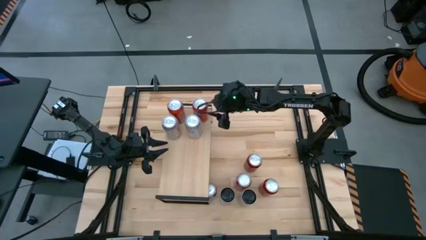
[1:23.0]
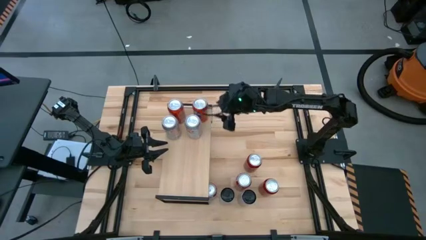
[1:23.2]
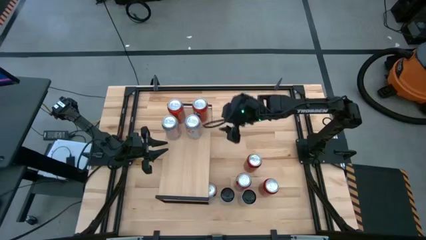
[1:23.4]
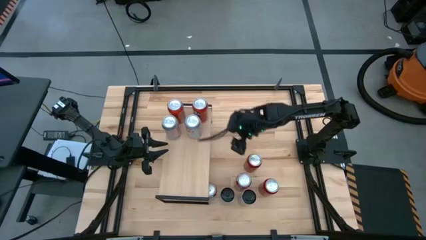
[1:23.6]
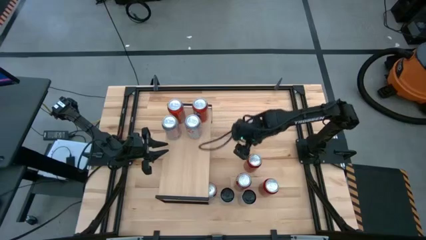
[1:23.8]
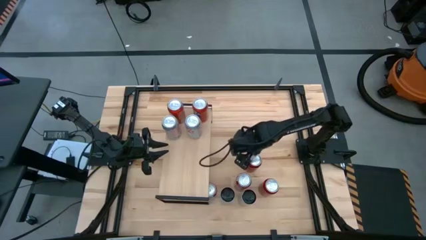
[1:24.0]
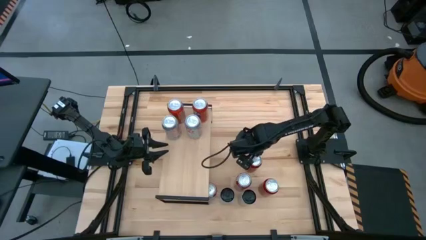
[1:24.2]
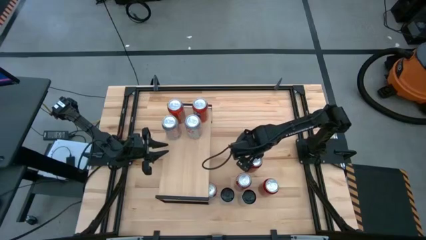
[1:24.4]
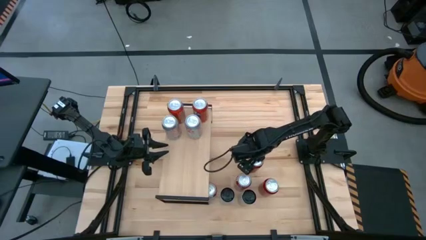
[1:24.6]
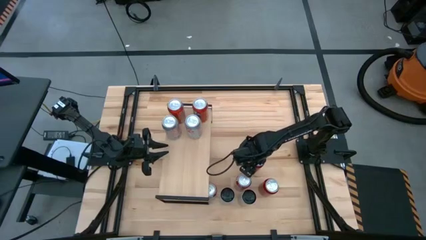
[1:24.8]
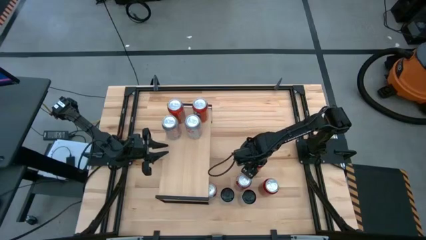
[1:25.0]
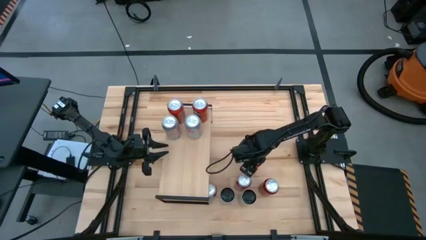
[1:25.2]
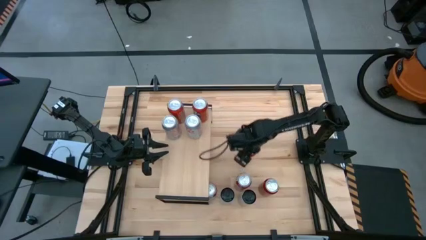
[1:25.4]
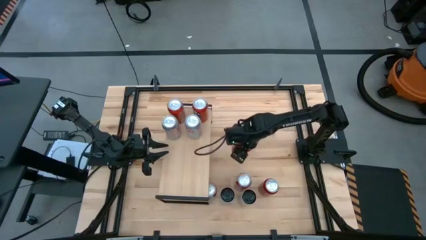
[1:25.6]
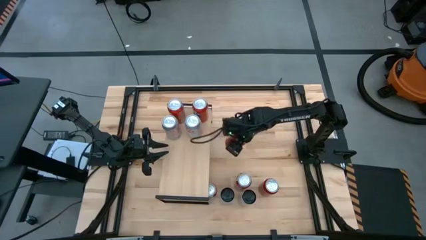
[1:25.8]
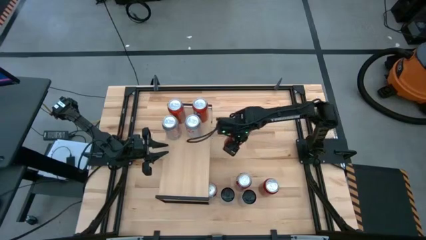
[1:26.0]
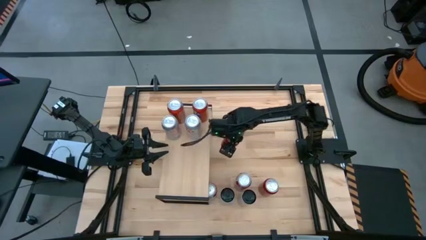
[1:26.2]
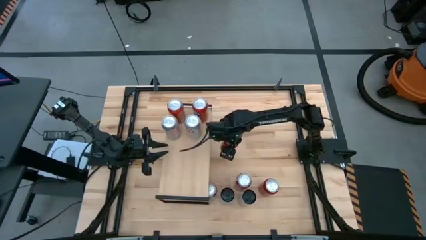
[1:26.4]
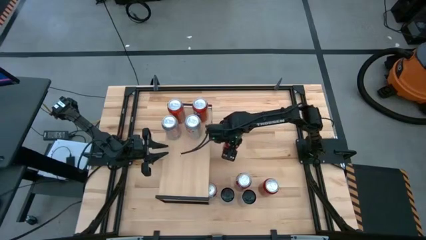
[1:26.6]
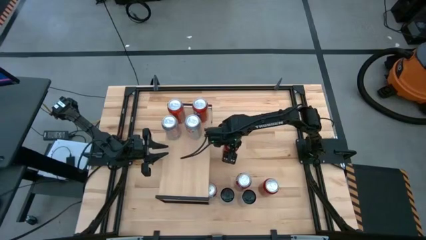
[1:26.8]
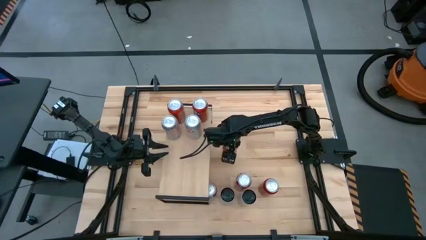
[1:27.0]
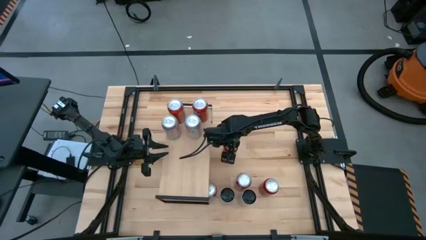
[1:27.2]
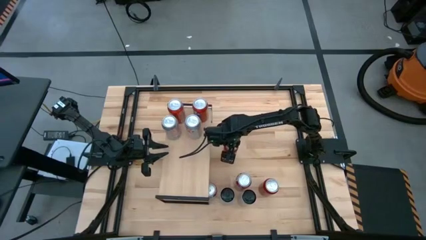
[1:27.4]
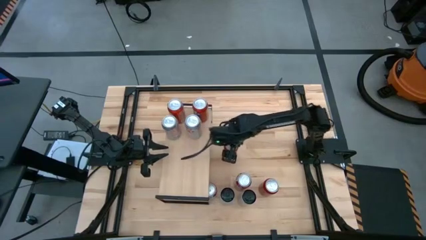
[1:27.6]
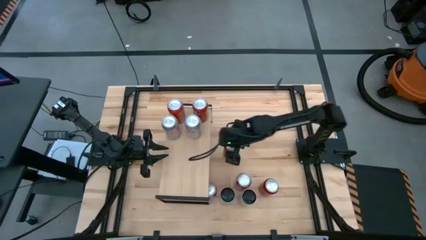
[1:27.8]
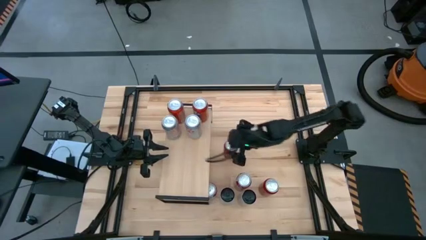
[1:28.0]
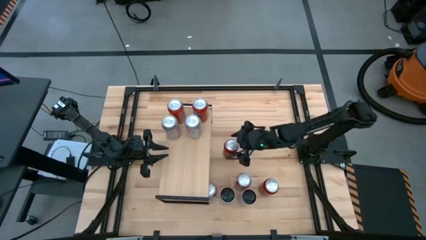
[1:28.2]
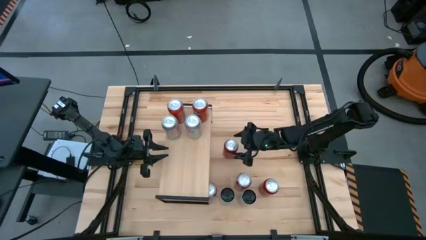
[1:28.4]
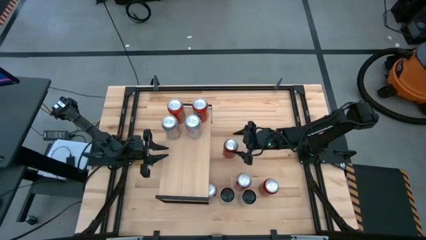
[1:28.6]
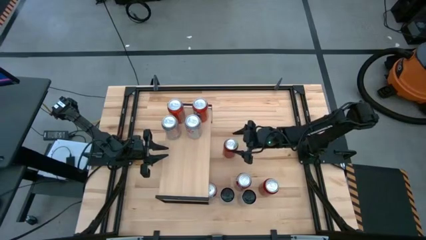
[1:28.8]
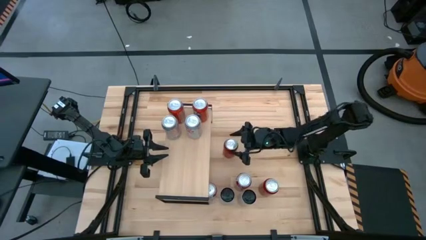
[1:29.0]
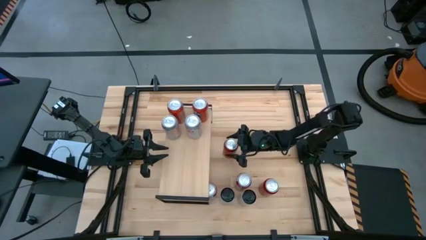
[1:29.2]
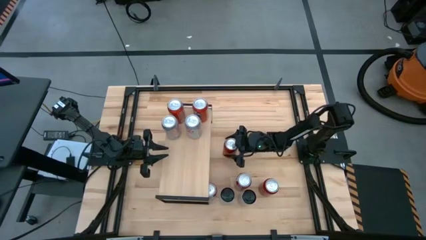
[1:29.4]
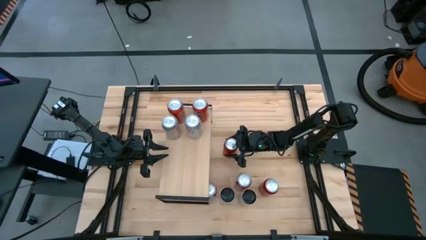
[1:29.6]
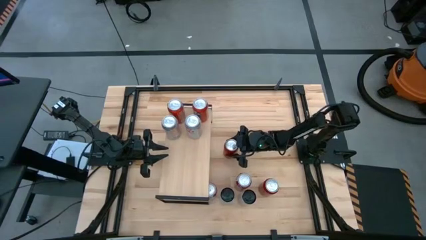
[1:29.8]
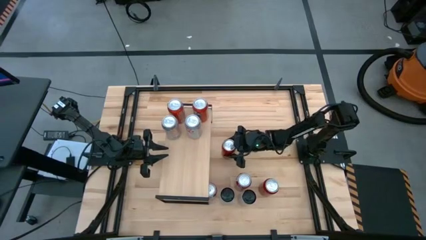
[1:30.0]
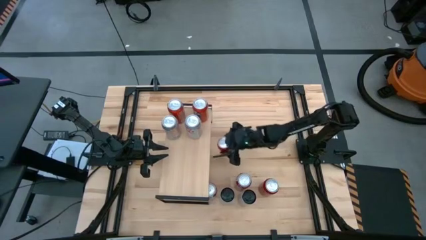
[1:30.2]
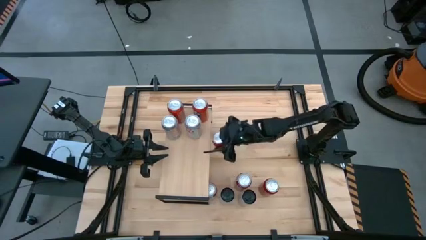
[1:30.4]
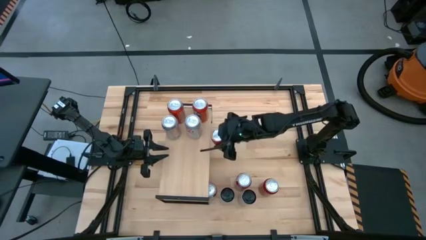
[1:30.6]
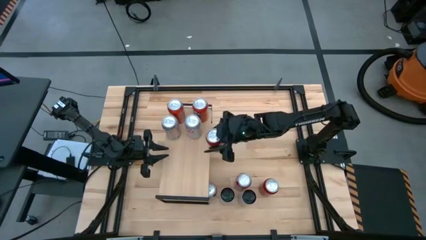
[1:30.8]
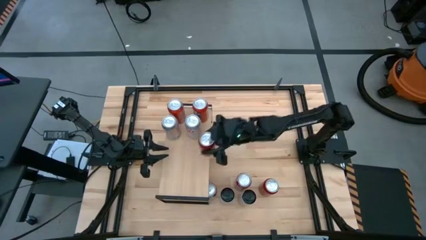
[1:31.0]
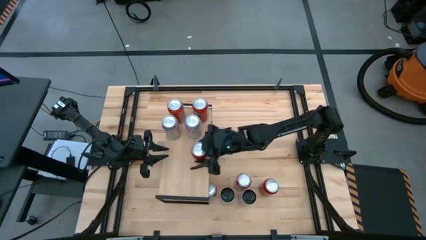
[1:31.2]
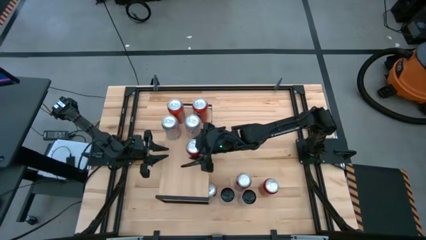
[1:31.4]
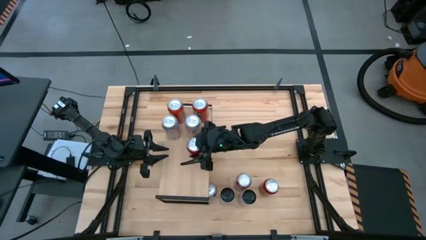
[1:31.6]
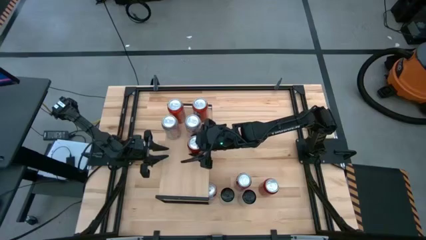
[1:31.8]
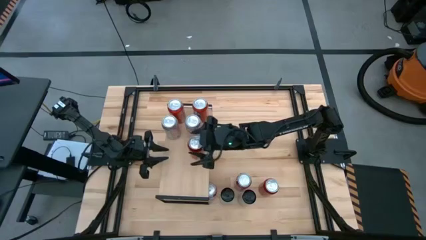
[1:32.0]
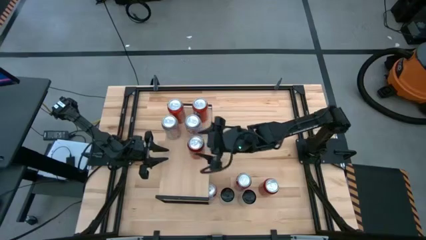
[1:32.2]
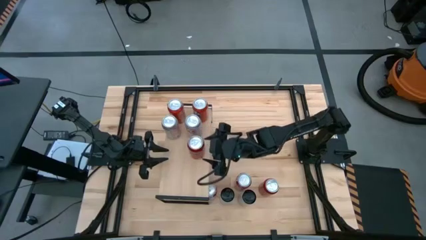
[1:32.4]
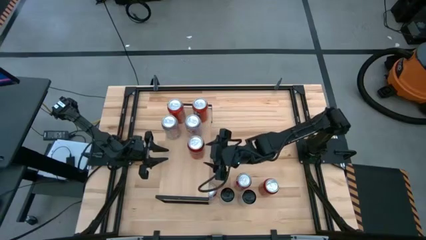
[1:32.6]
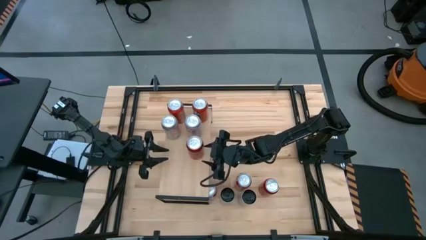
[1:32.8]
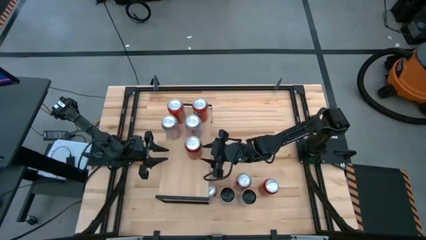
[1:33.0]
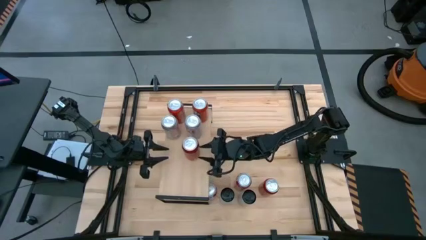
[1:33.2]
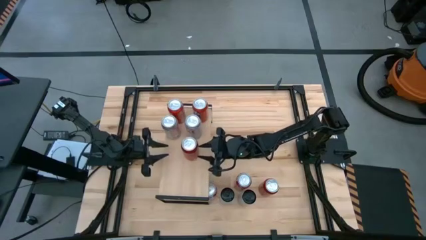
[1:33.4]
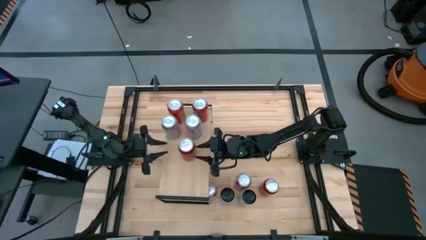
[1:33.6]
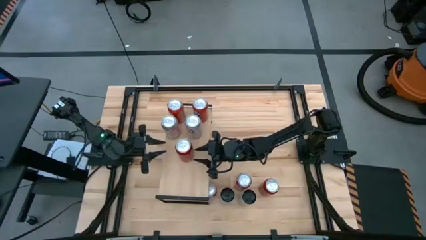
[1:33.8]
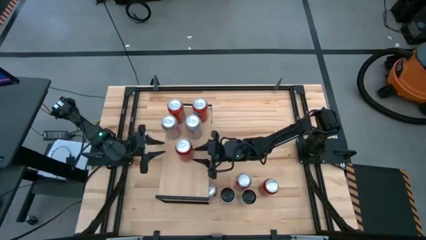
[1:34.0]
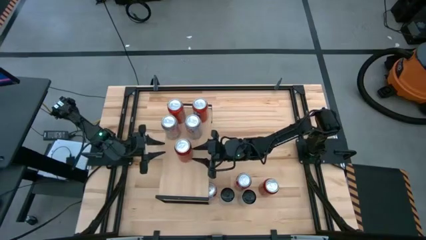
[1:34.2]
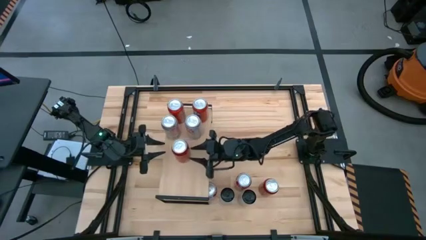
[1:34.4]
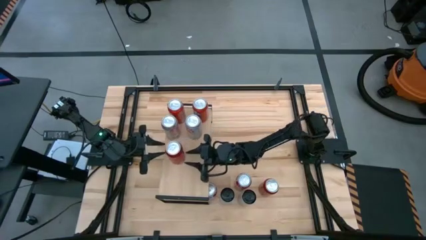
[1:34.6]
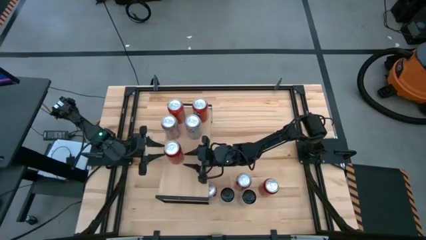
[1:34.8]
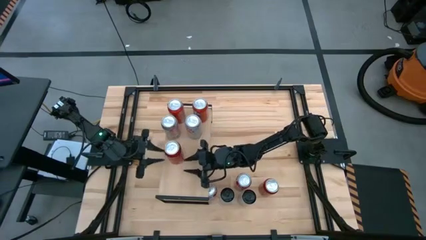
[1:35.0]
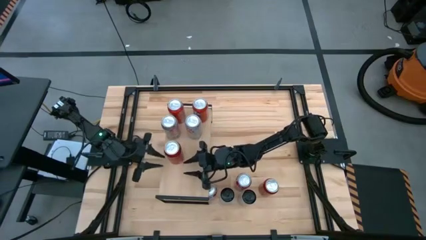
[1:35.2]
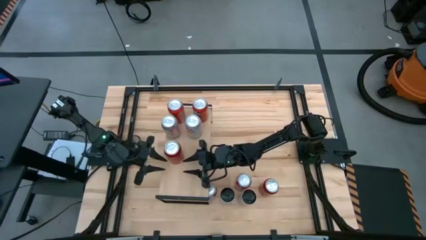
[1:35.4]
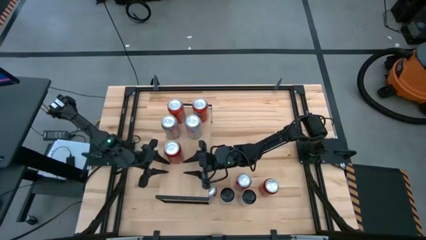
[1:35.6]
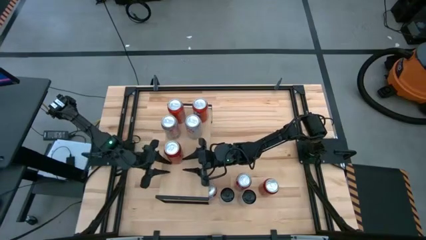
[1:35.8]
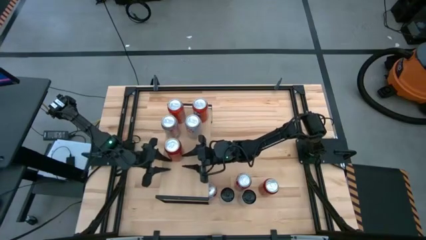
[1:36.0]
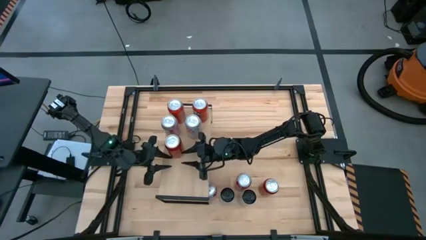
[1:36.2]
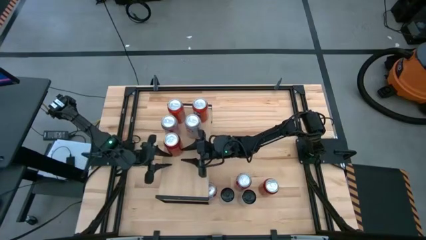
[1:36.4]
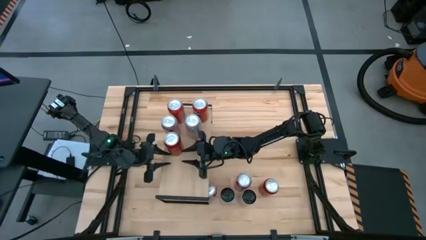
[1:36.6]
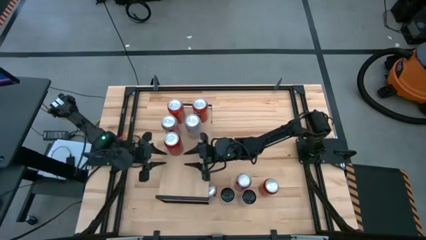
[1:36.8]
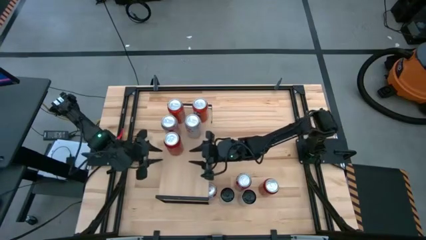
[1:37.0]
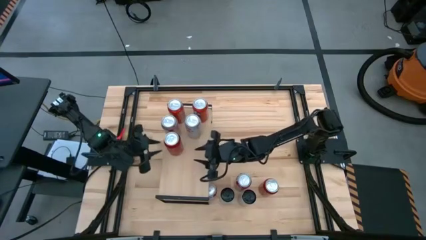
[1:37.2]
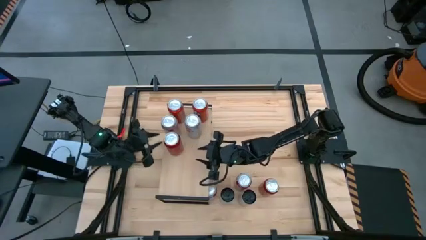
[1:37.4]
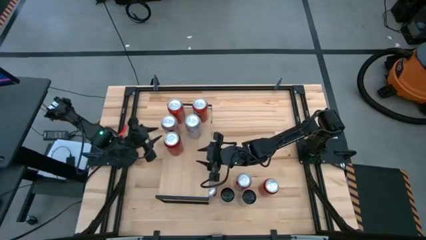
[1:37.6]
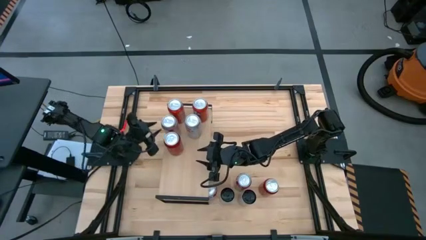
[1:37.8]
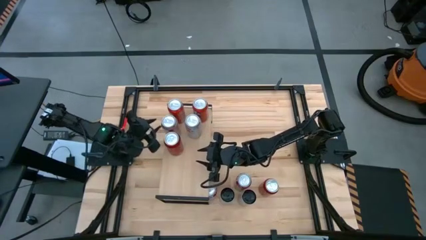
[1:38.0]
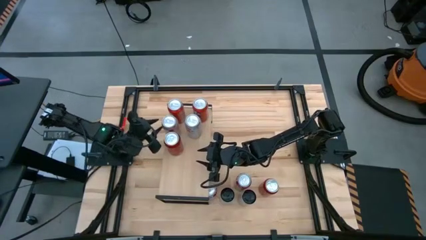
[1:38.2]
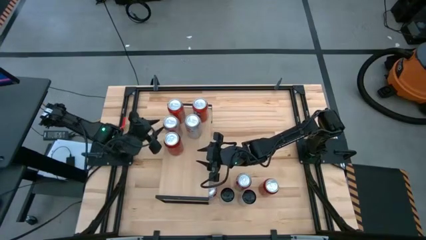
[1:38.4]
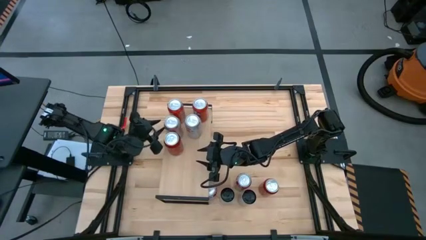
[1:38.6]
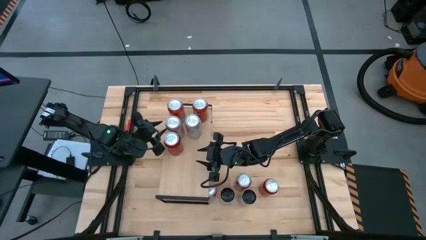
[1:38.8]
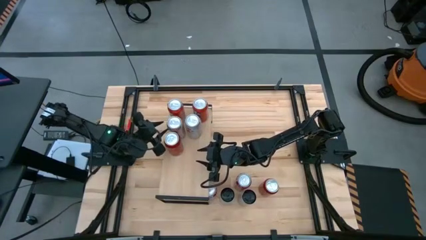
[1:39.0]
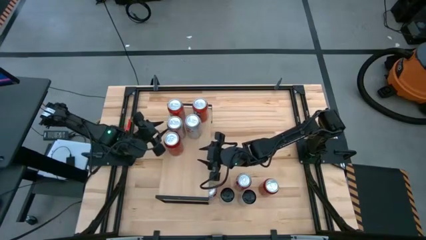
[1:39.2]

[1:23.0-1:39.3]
Task: Place canned beverage on shelf
Put the top red black soda can on the shelf
